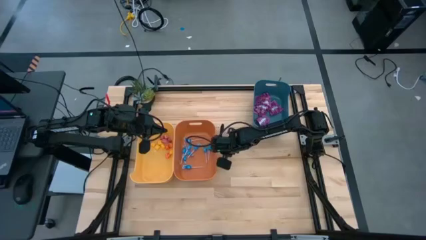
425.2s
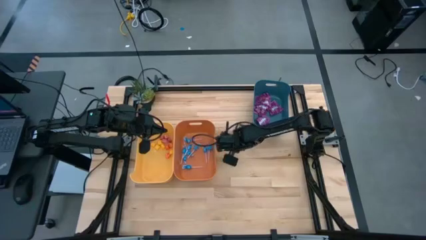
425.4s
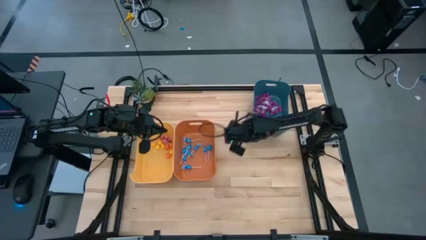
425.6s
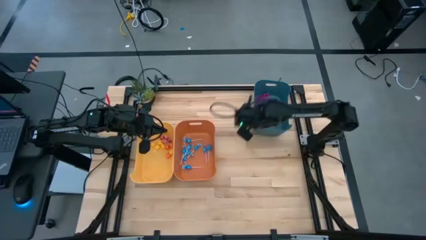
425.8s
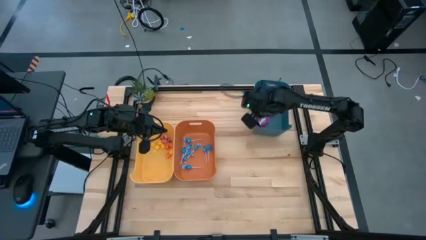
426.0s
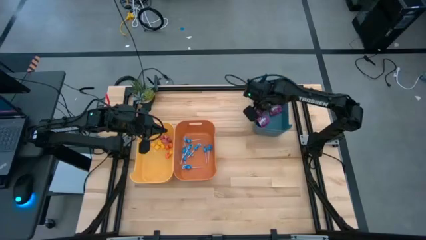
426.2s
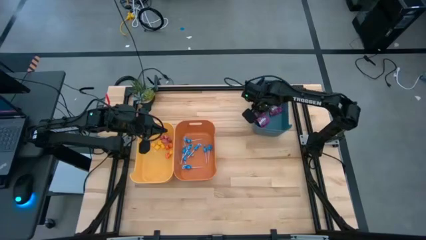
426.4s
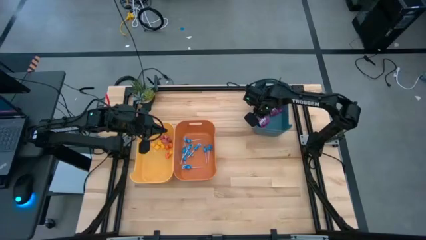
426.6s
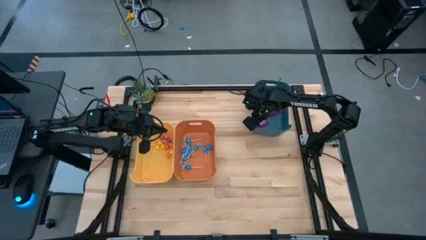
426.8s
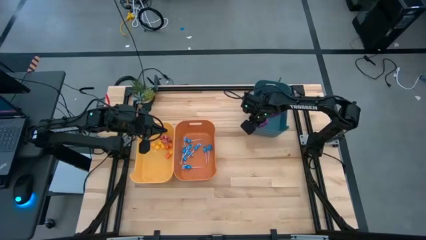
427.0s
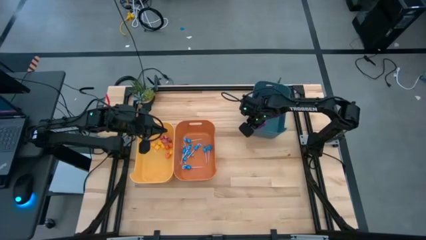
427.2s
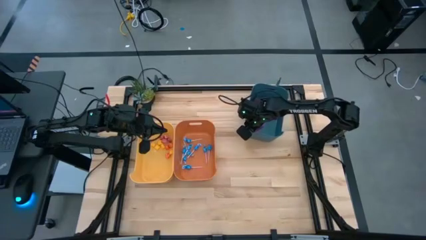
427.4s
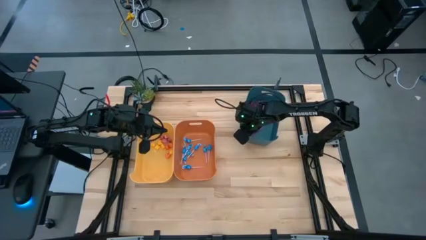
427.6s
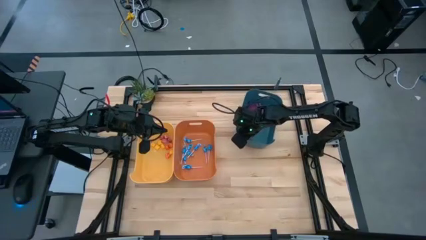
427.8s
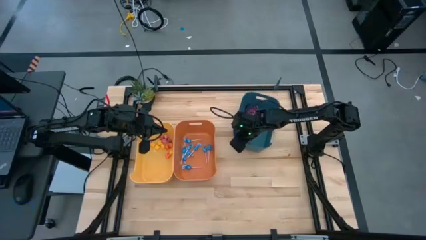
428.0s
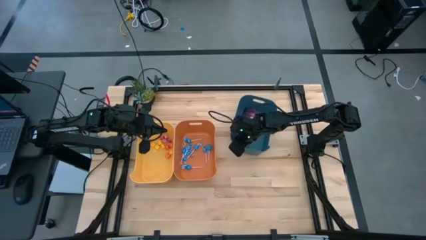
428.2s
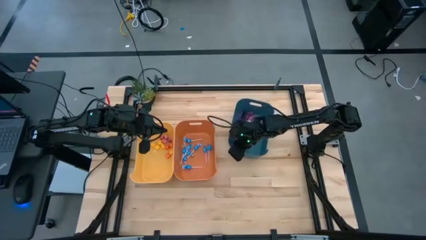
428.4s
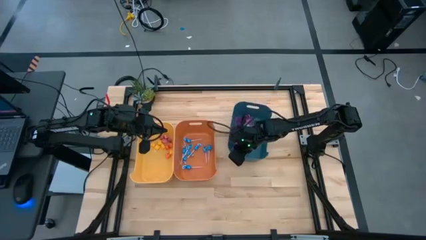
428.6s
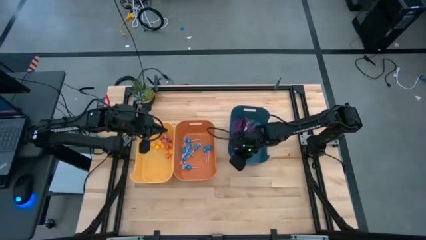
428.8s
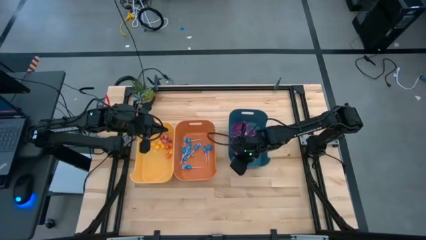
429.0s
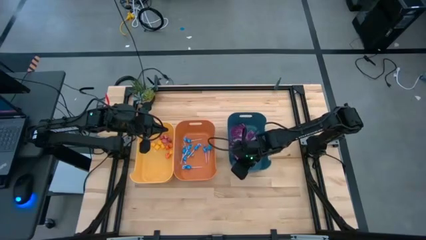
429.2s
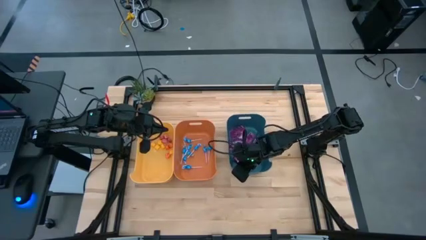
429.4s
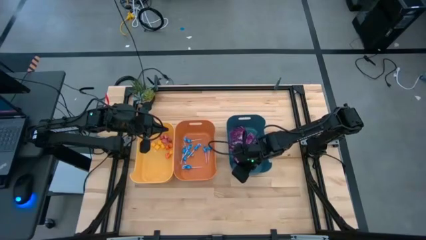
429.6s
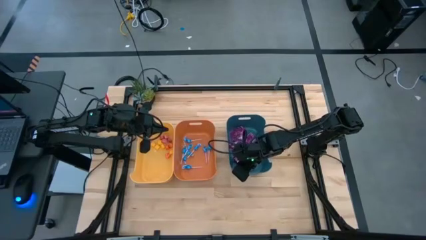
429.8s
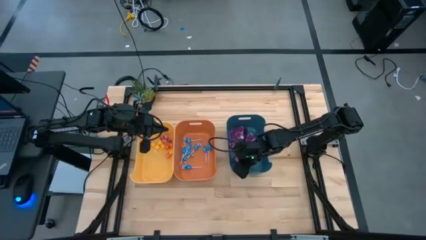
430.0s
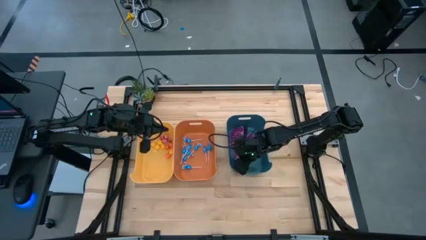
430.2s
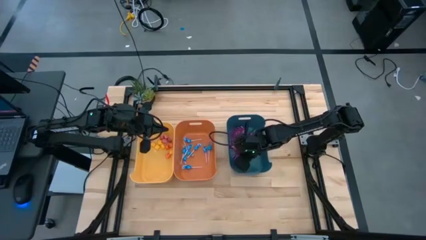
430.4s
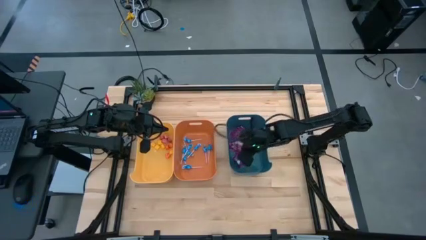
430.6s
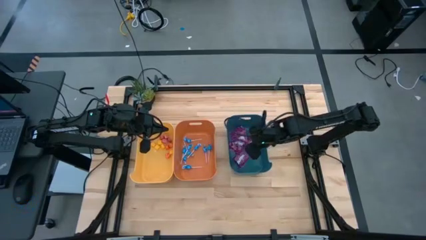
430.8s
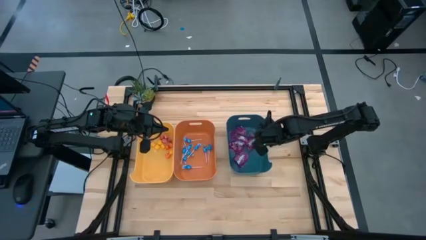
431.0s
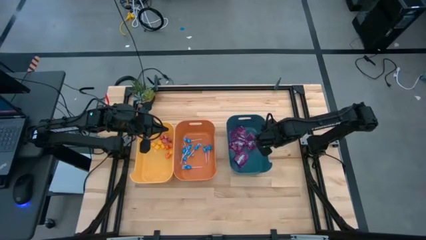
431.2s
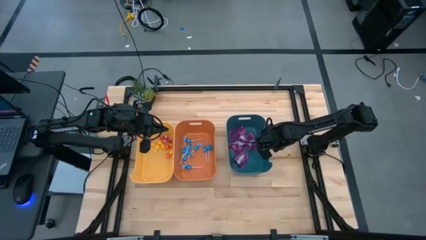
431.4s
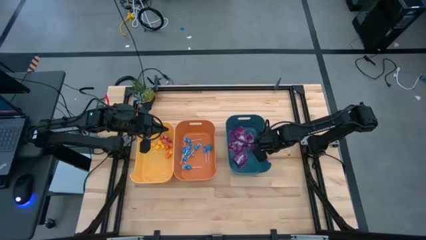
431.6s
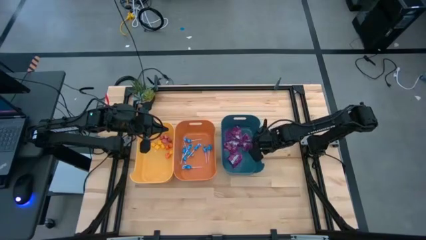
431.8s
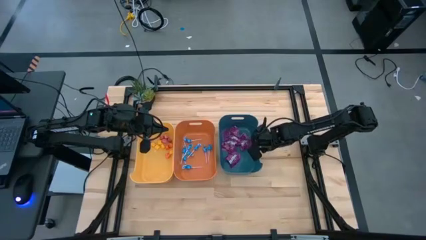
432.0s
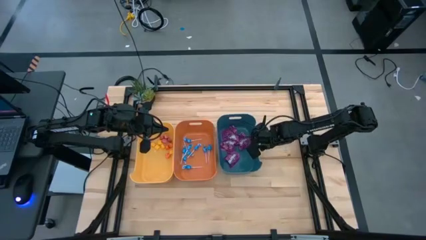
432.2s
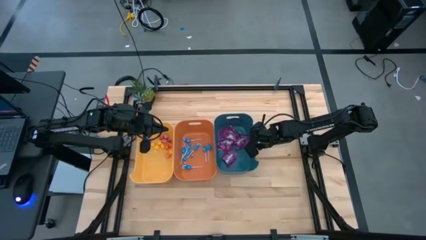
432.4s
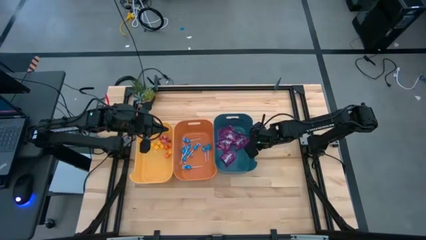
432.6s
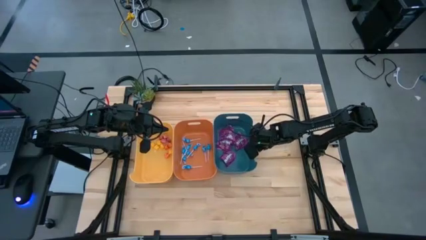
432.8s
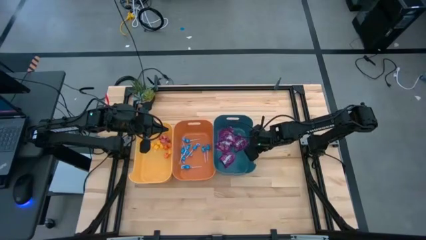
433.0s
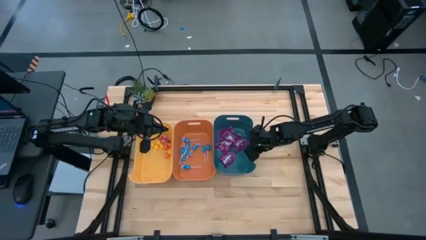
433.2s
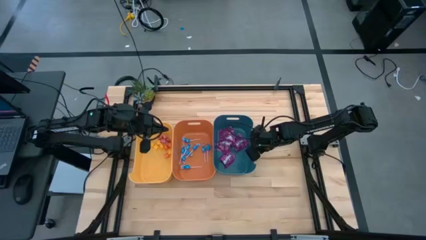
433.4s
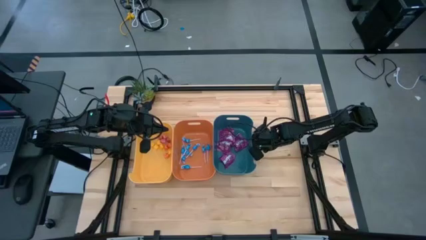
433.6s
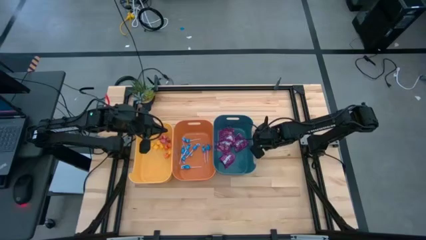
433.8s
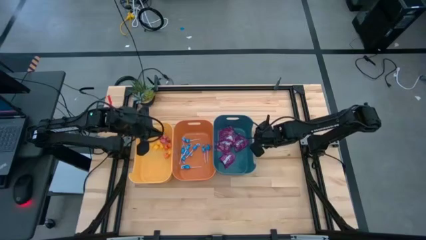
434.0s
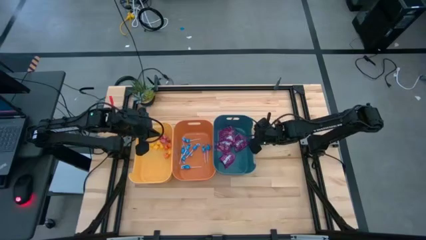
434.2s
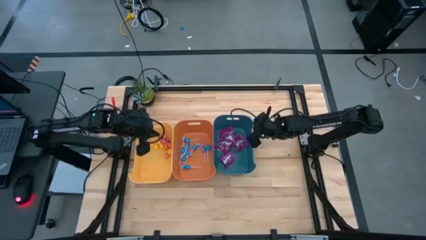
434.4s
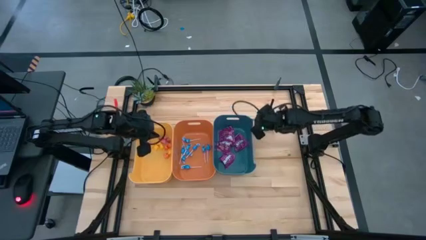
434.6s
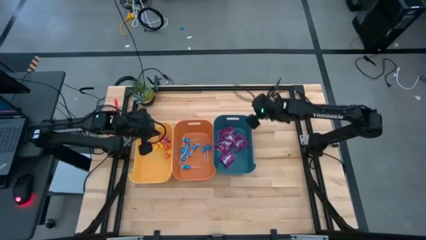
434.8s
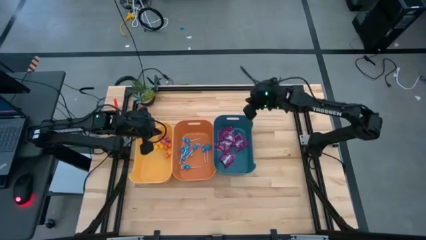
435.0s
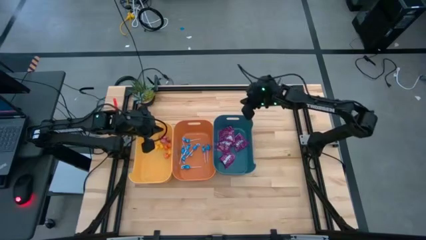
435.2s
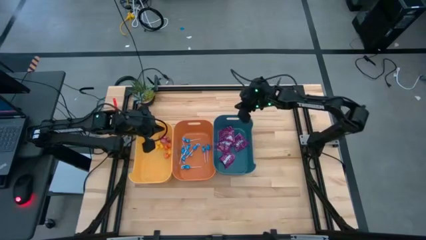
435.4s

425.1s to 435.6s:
Task: Sort candy
Move the blue bin beside the orange bin
